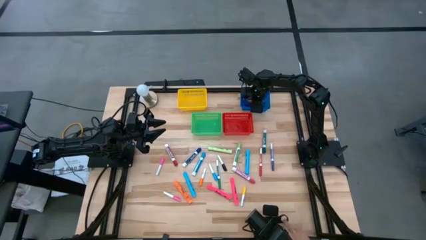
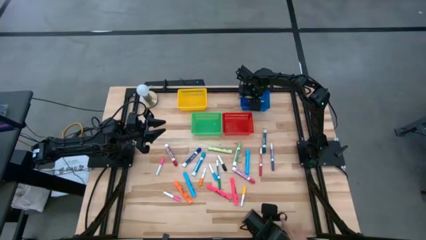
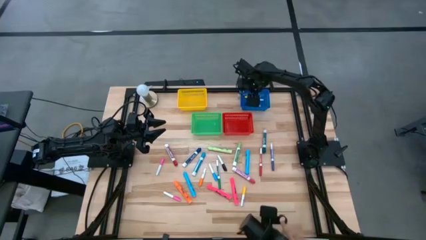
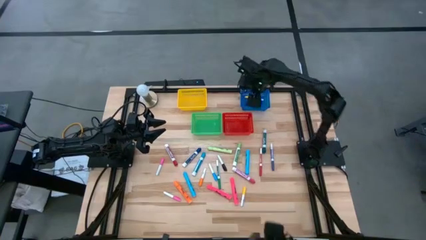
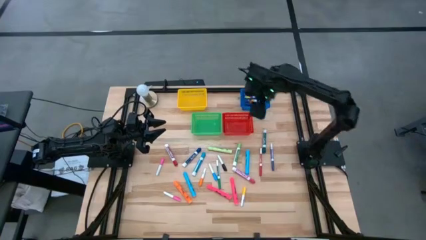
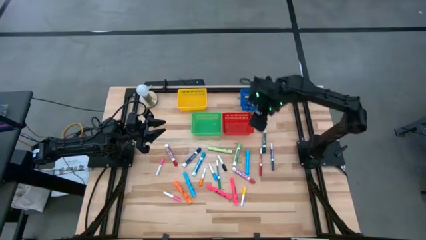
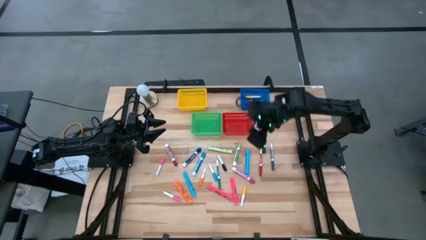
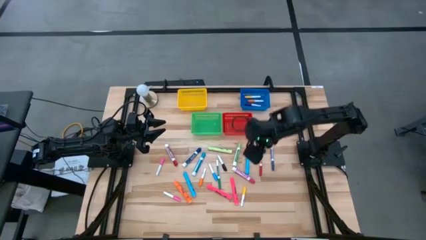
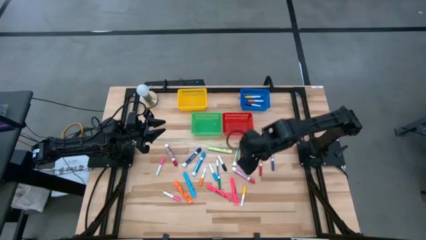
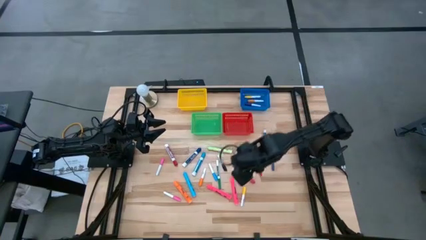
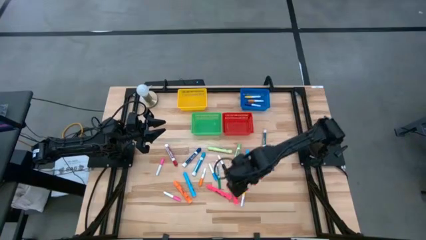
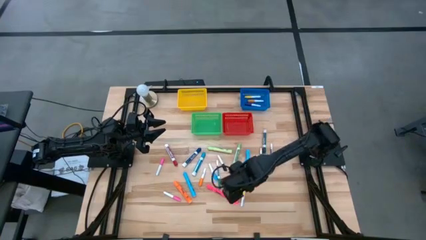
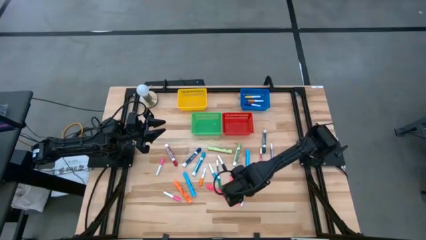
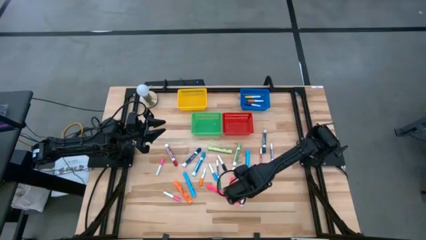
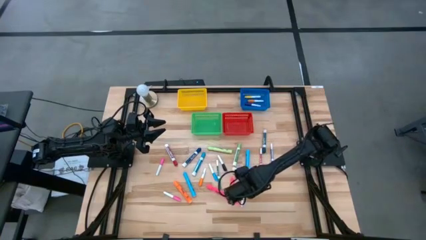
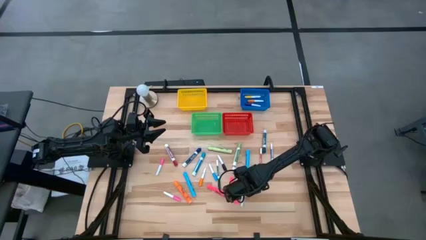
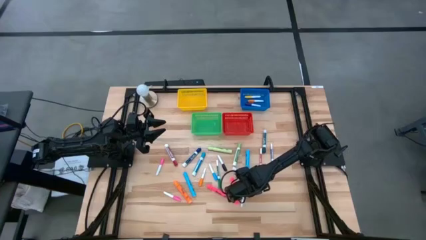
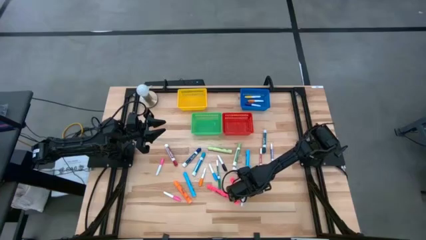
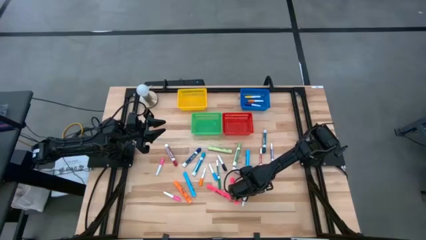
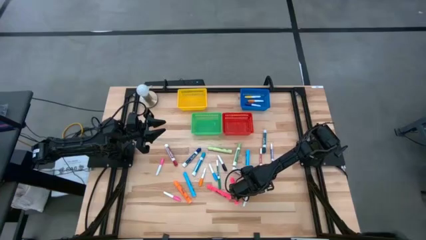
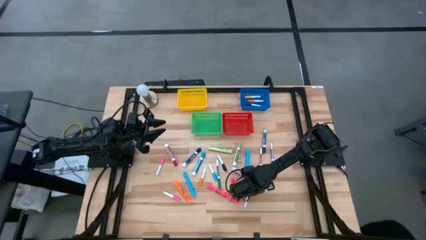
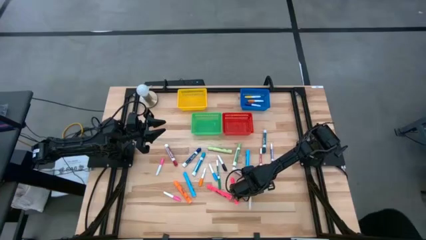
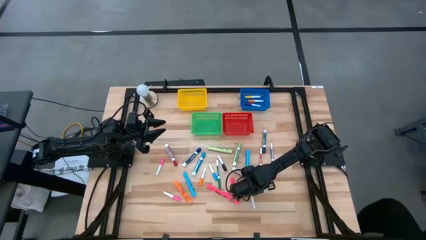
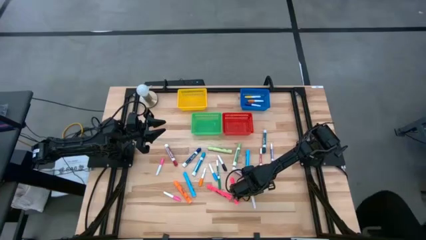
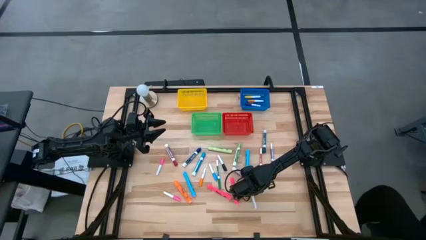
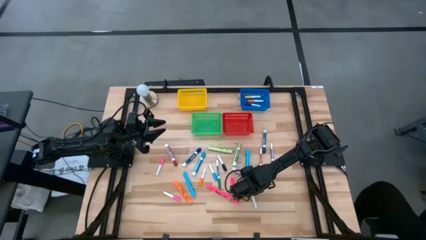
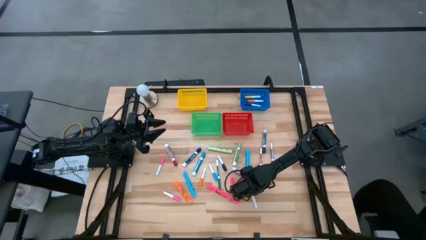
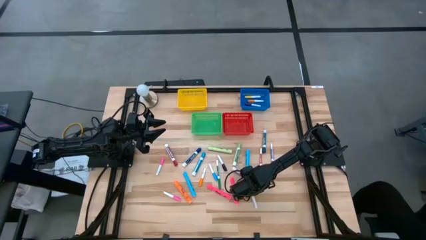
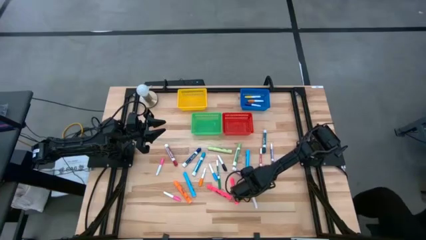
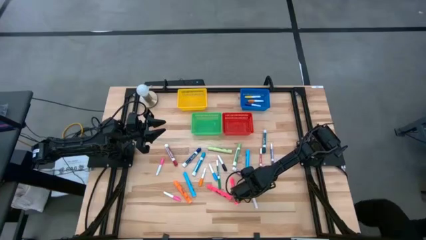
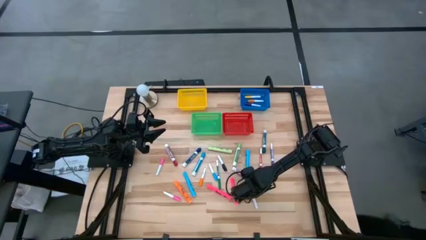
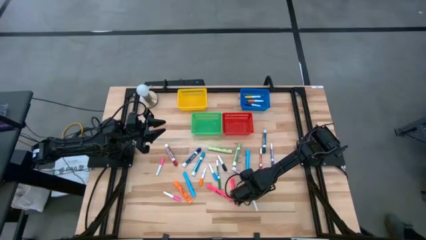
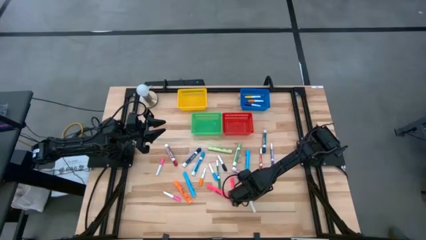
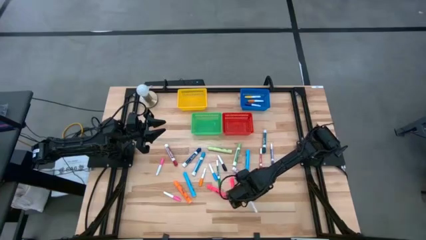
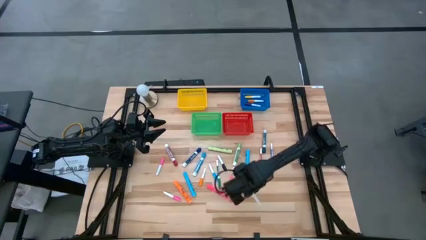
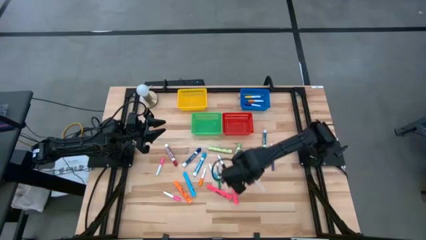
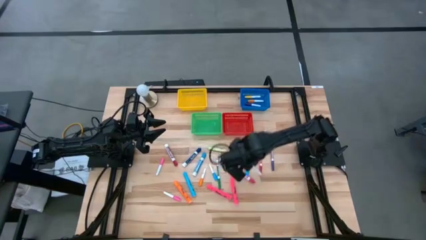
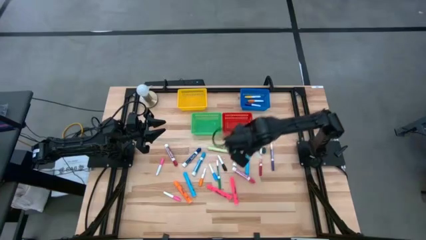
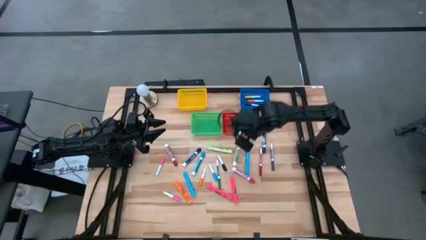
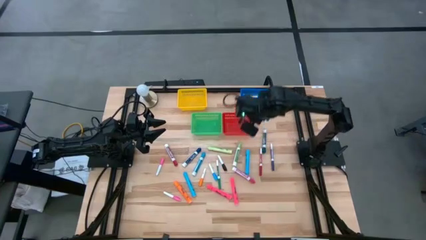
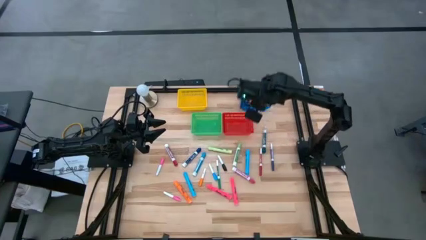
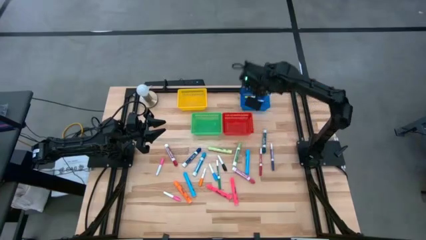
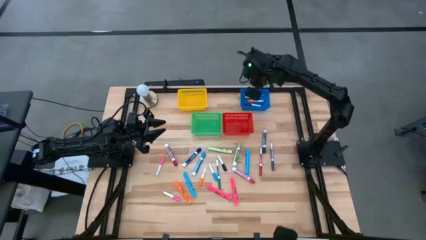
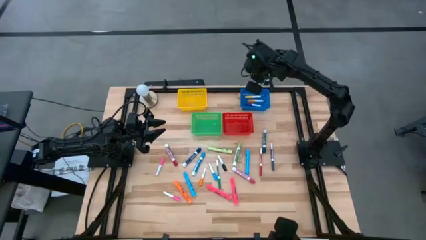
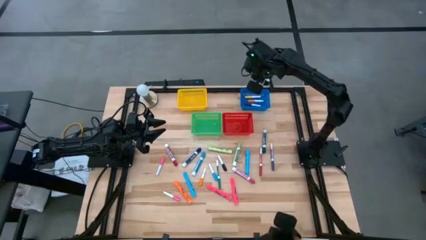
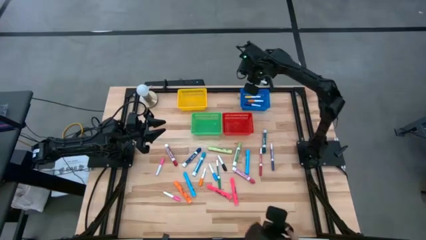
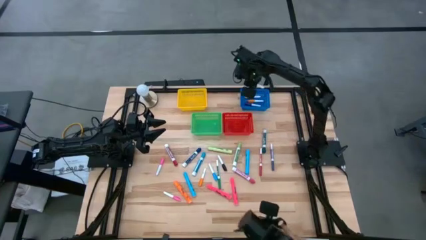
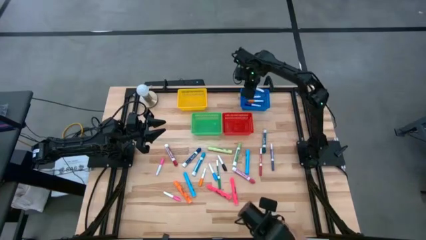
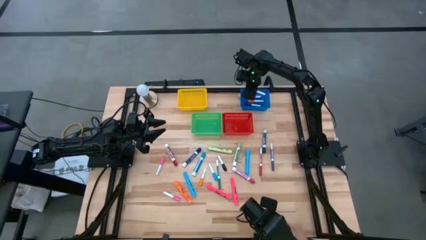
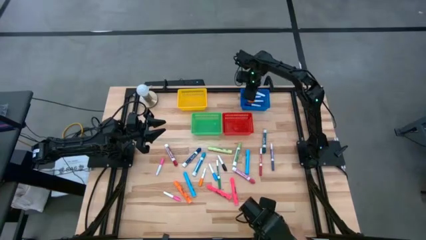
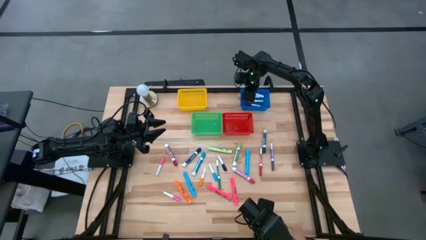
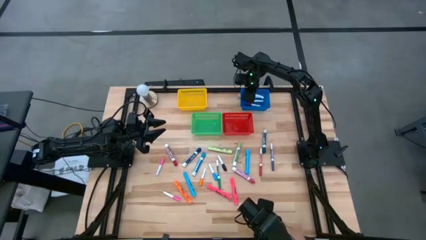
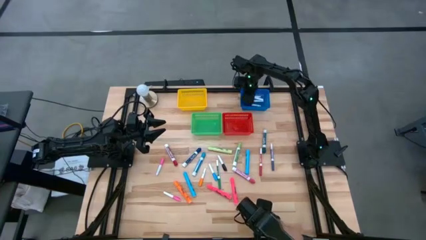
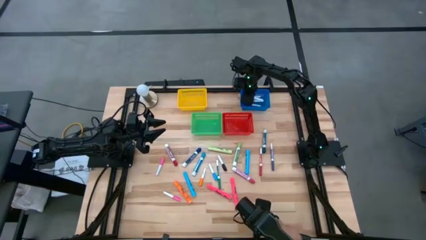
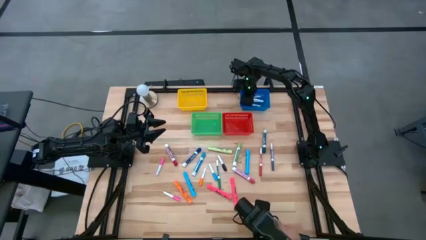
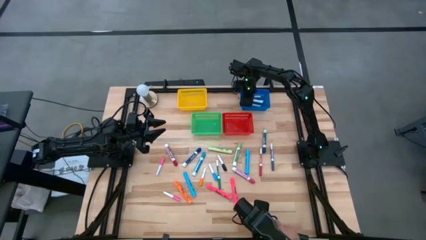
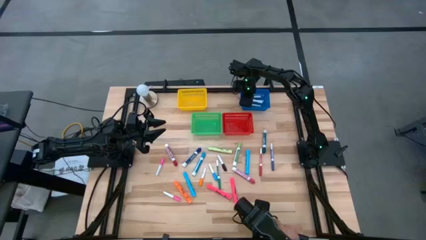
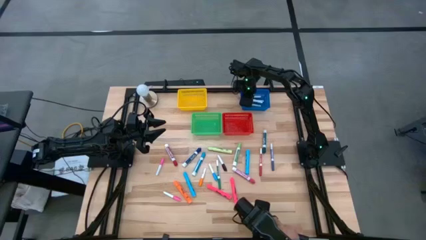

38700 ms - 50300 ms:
Task: Pick & Place Markers
Put the yellow highlighter into the blue bin
